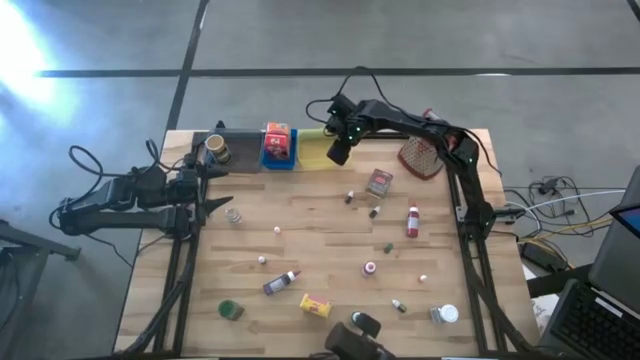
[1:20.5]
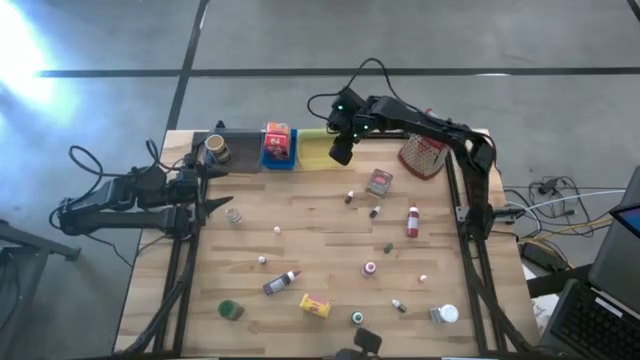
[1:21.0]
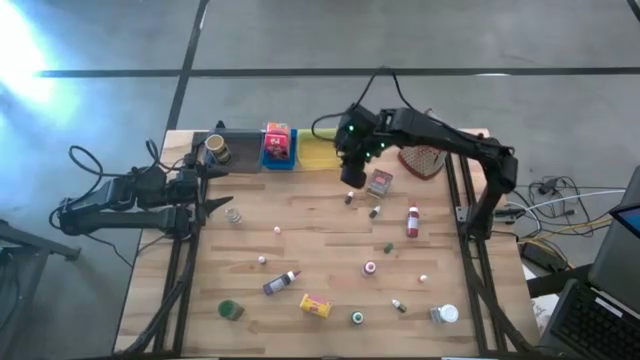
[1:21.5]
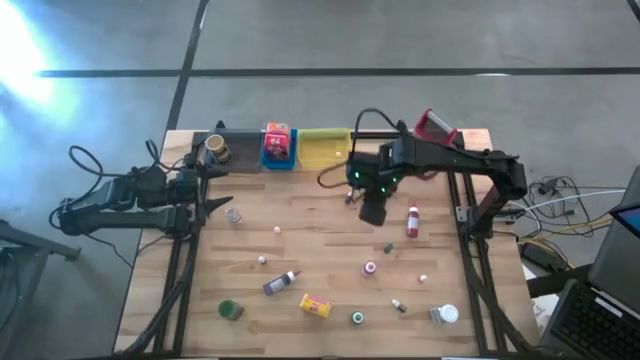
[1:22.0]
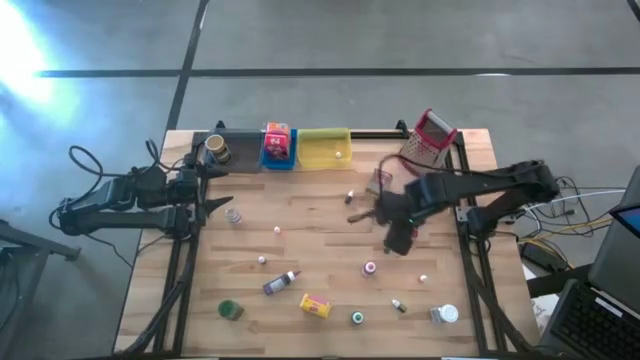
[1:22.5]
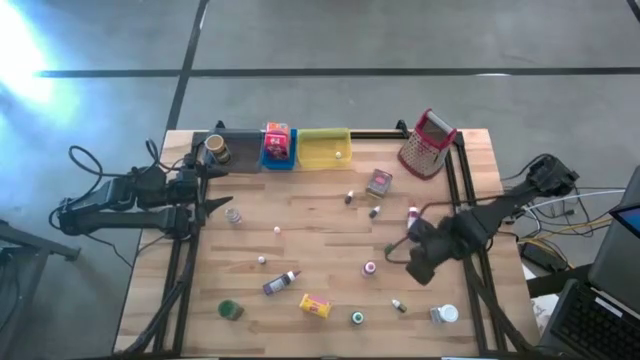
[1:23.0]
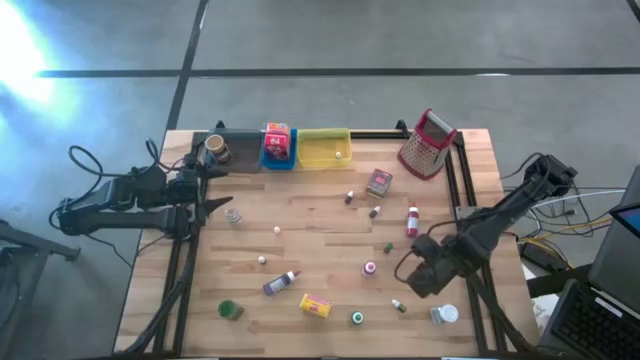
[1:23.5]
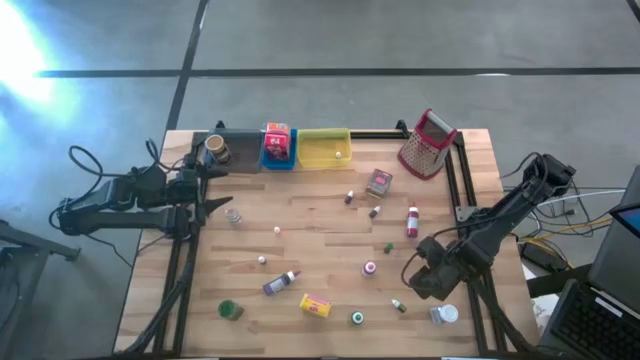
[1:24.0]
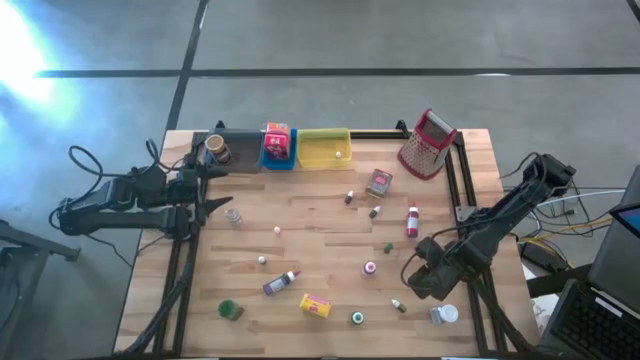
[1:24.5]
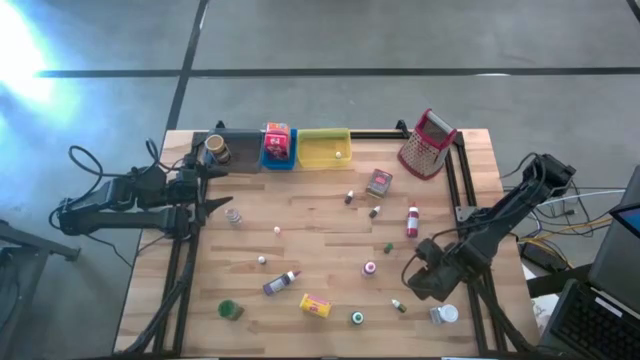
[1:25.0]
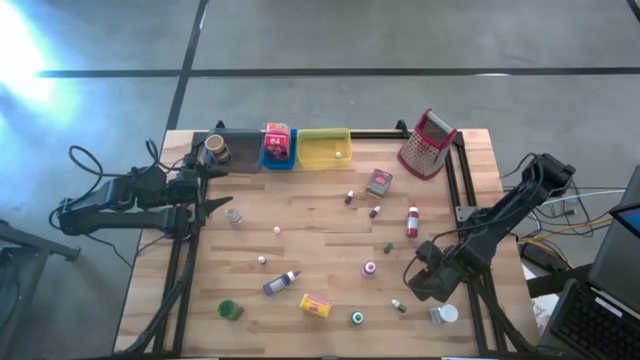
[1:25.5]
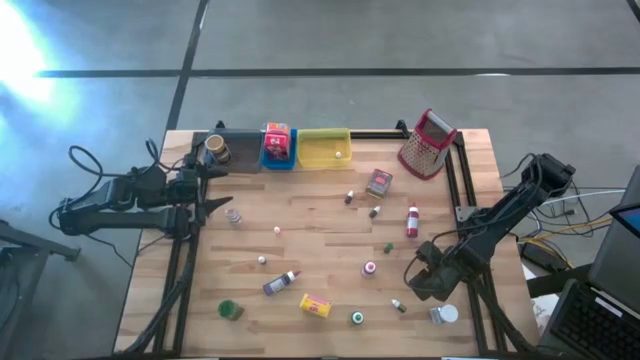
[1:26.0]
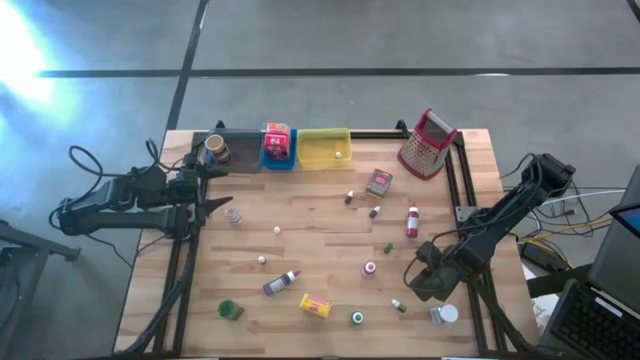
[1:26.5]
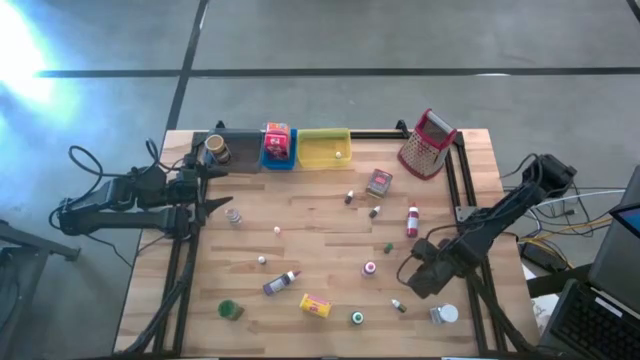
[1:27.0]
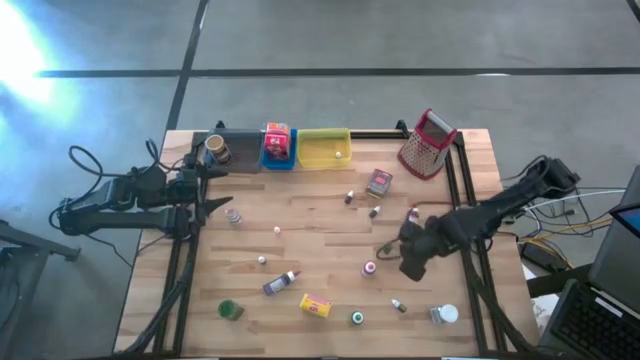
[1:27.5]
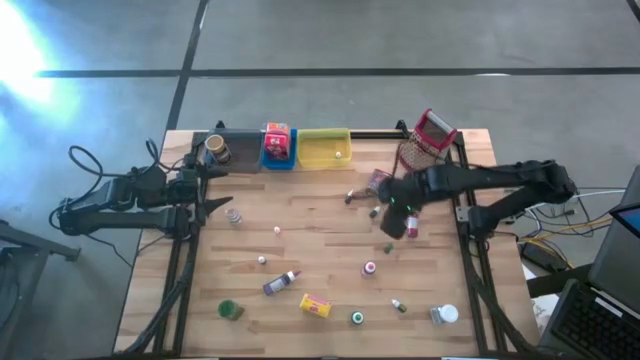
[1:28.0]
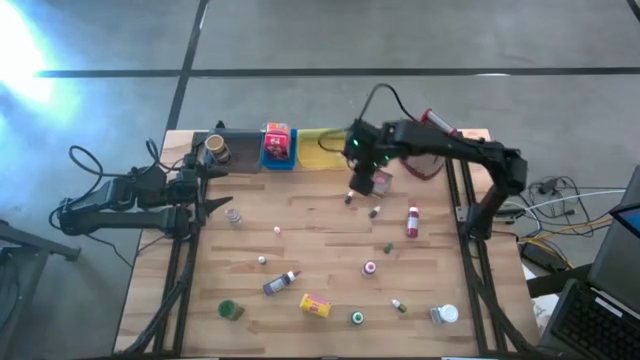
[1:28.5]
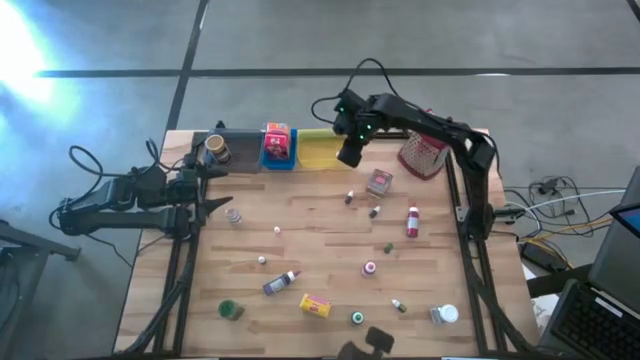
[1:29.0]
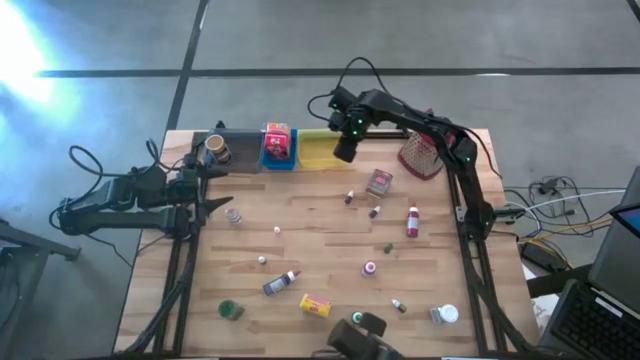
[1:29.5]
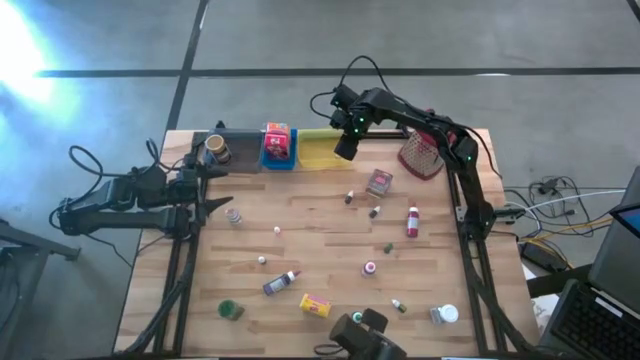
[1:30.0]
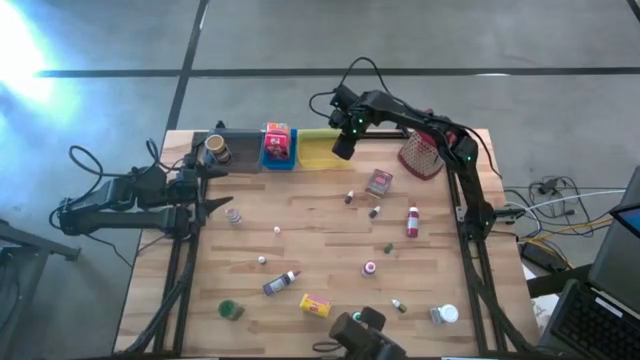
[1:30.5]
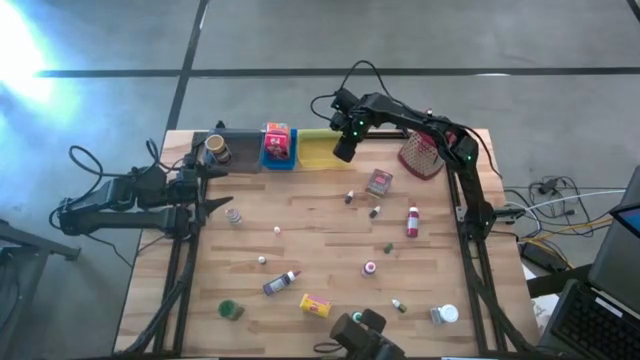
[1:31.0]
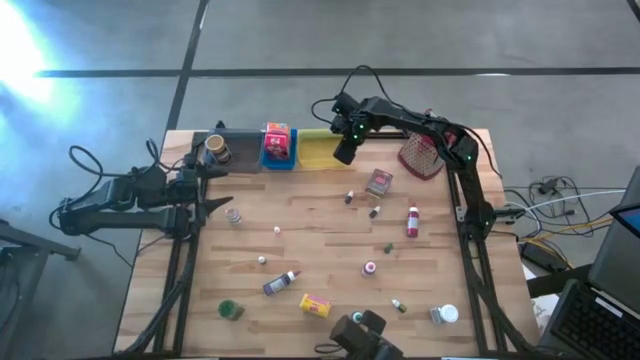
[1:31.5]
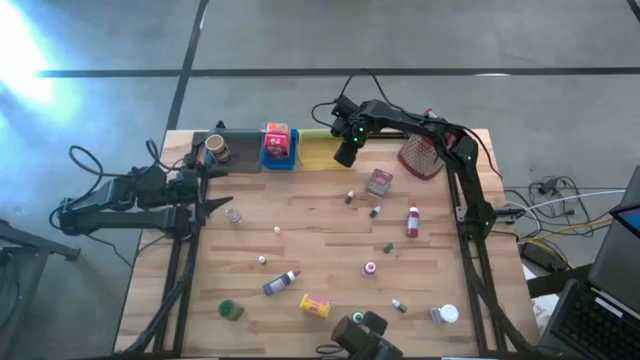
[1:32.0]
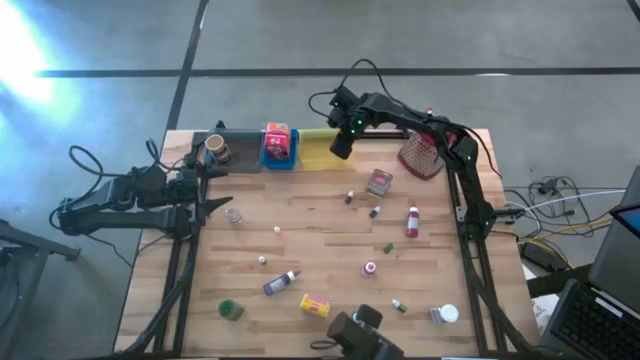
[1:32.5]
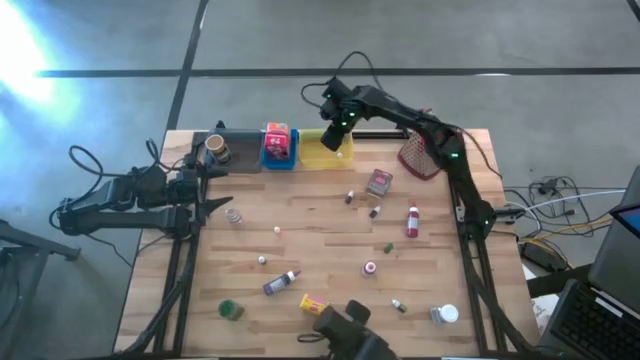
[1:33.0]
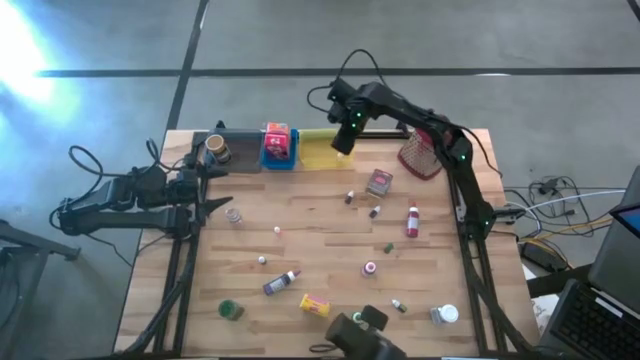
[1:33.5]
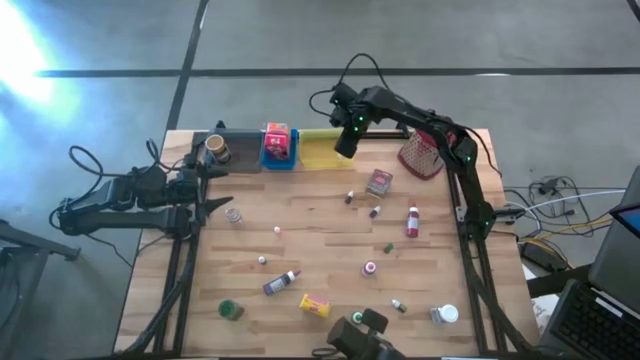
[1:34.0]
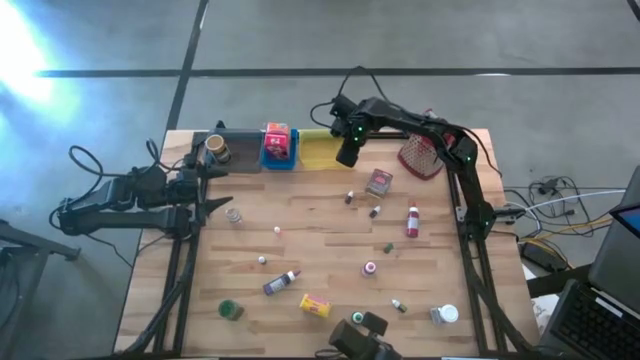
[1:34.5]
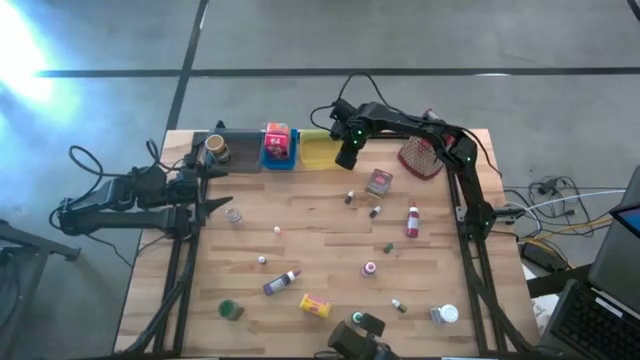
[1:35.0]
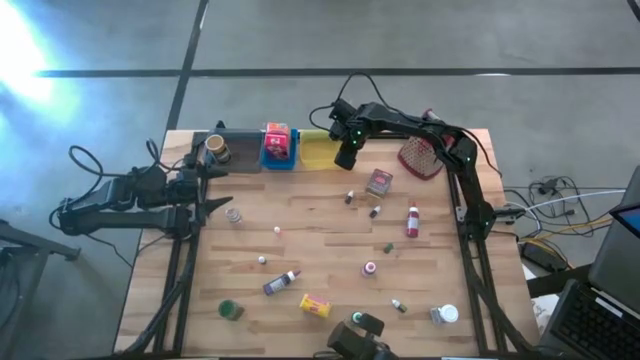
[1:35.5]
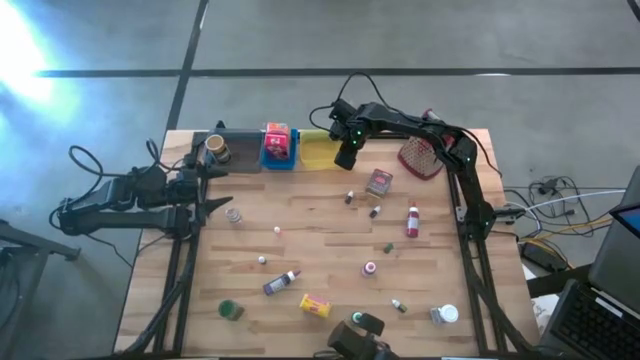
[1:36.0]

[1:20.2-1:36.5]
Task: Pick & Place Kitchen Items
Put the right orange food coloring bottle into the yellow bin

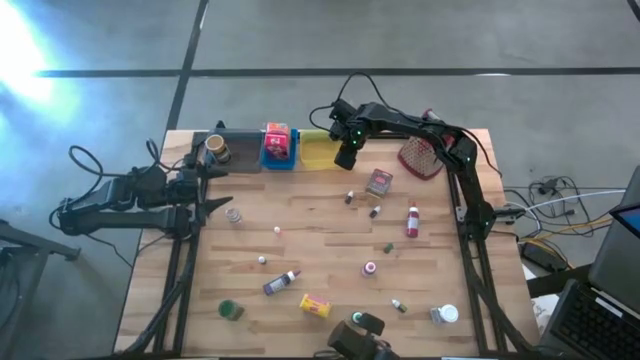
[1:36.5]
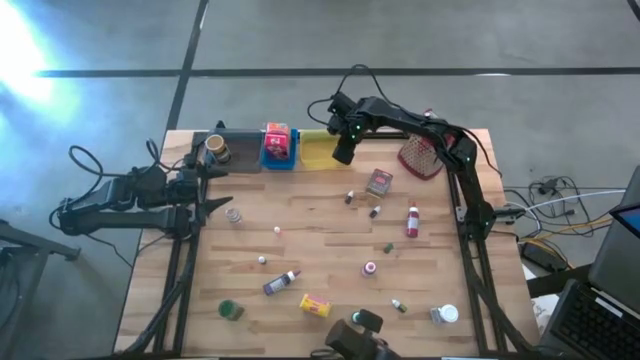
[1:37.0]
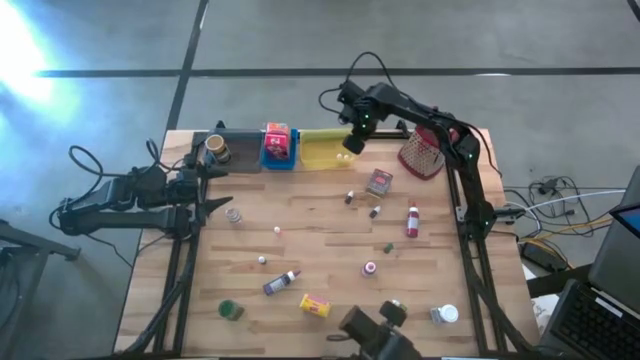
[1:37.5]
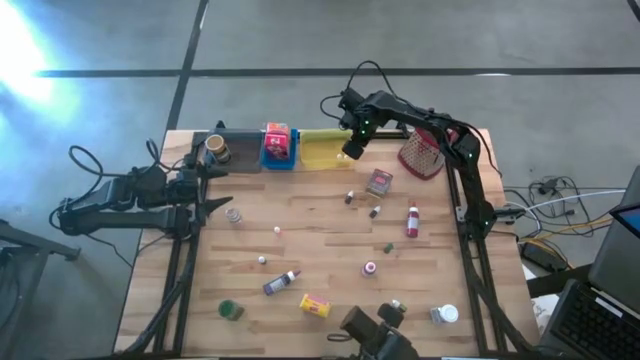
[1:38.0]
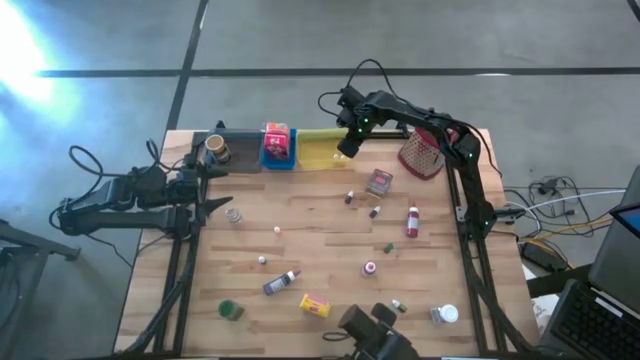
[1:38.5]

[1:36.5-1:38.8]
Adjust the yellow bin on the table

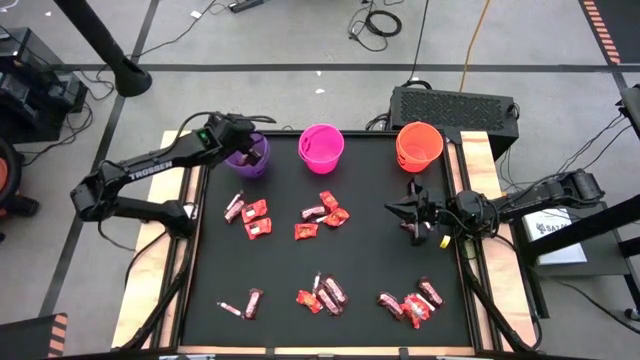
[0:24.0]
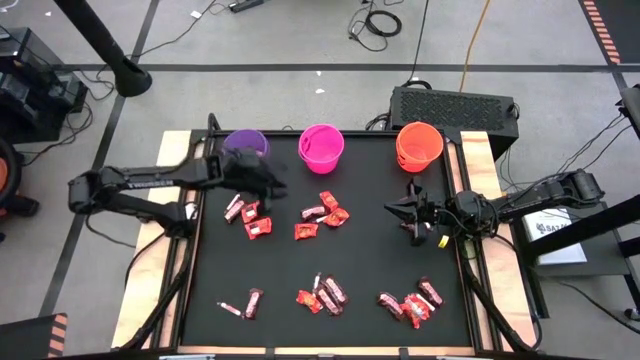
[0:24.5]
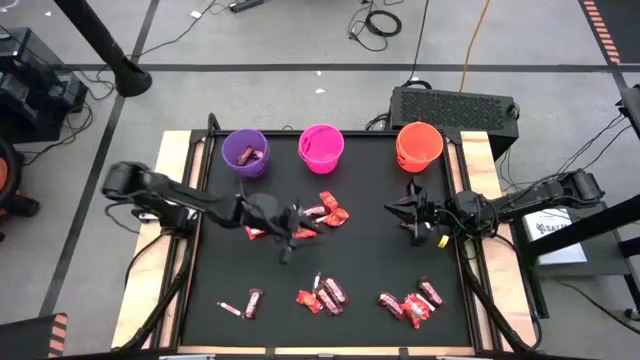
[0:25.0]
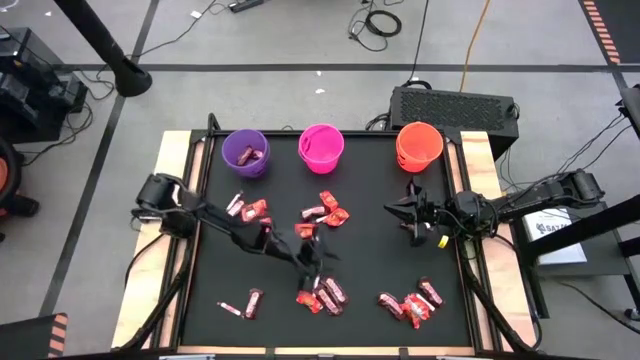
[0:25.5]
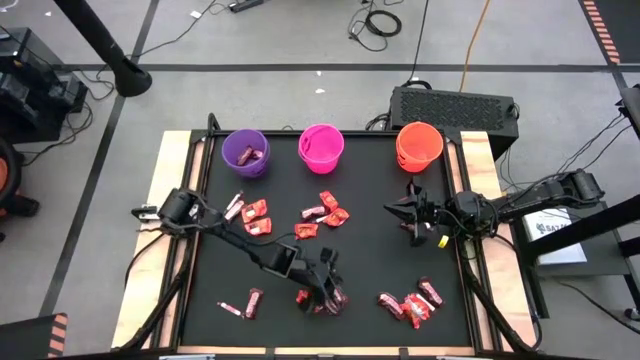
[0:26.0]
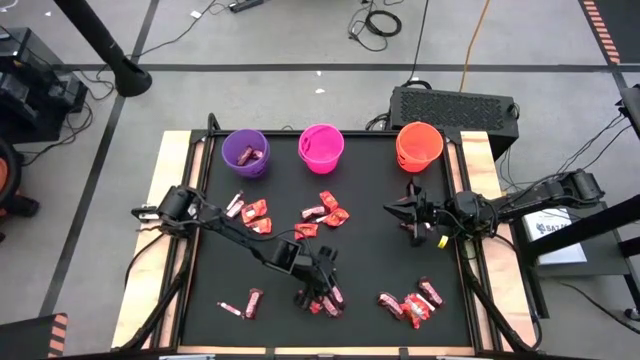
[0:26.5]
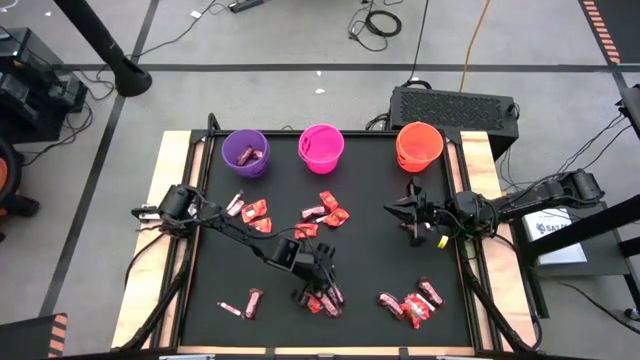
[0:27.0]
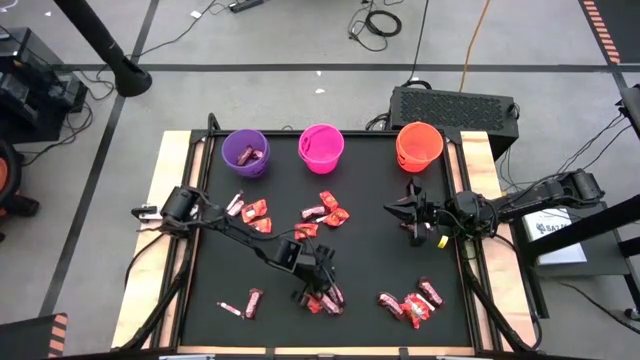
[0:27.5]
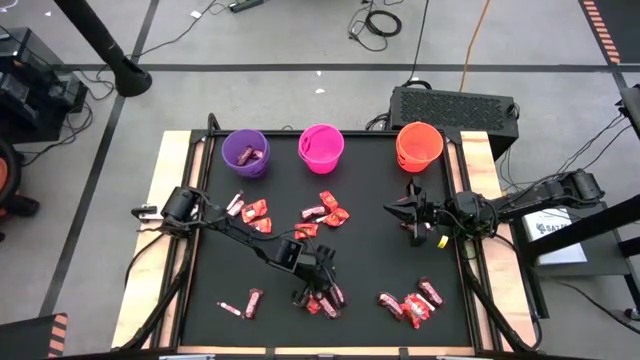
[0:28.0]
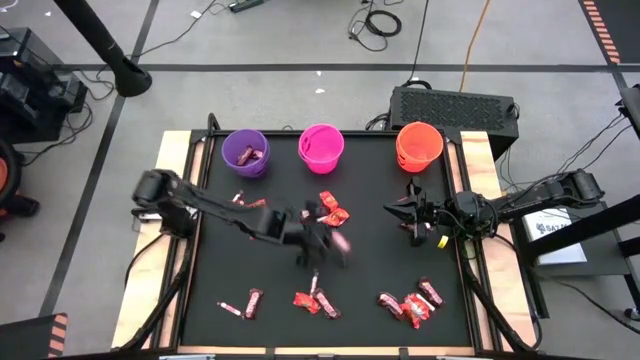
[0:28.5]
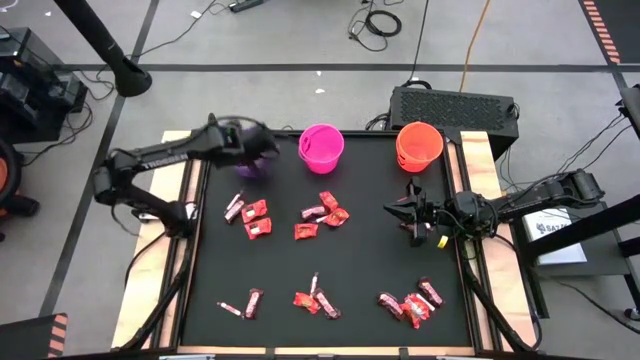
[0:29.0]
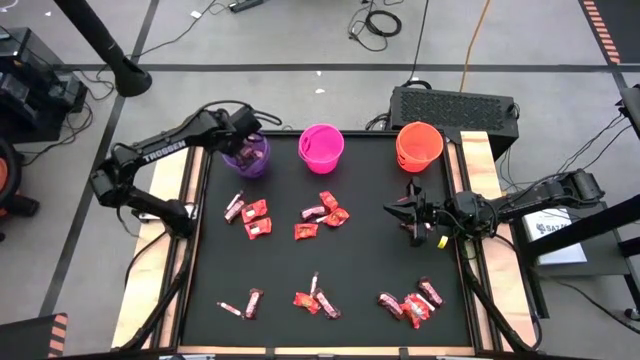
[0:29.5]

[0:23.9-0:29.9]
Task: Sort candy by brand, put in halloween buckets
Put the brown chocolate bar into the purple bucket
